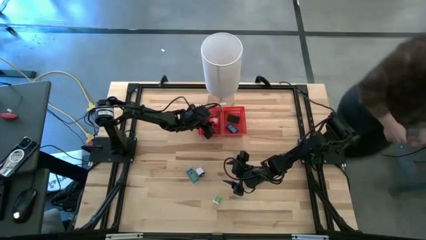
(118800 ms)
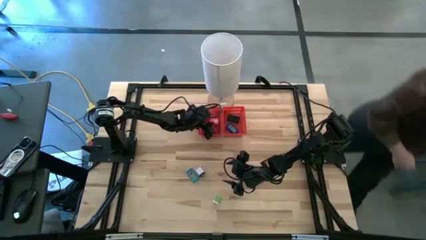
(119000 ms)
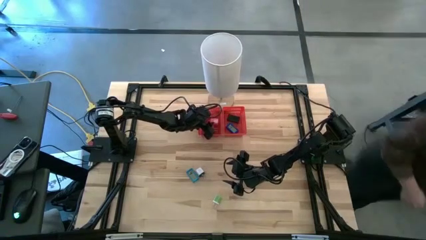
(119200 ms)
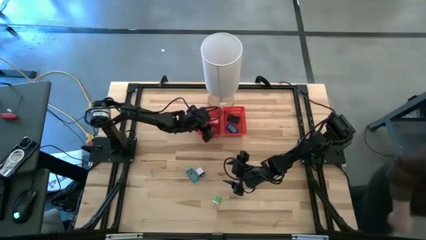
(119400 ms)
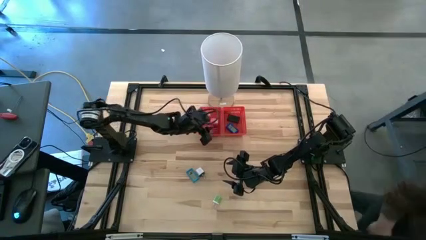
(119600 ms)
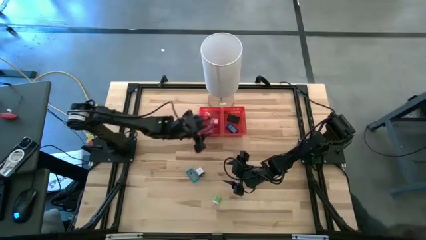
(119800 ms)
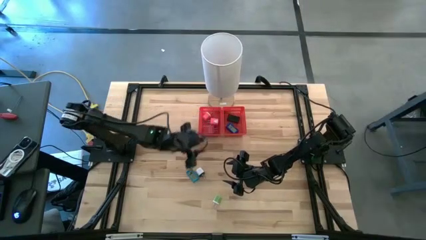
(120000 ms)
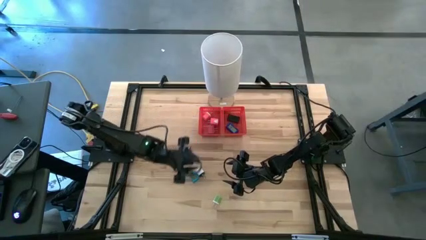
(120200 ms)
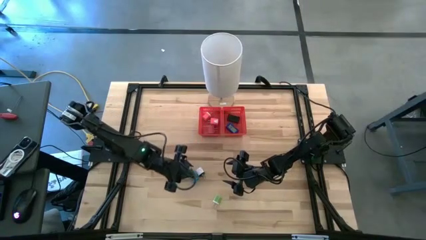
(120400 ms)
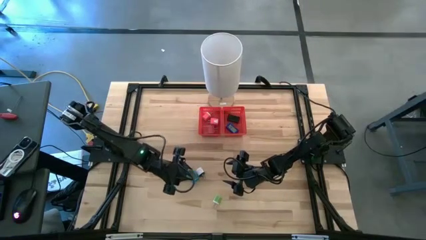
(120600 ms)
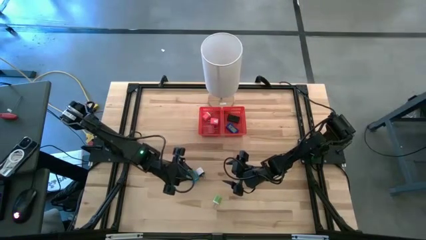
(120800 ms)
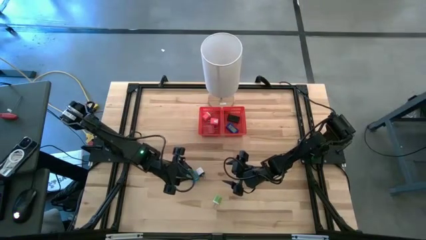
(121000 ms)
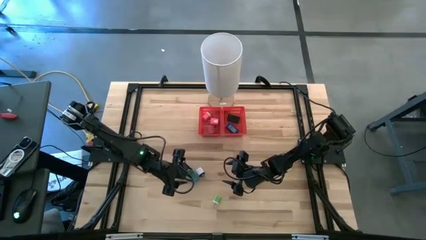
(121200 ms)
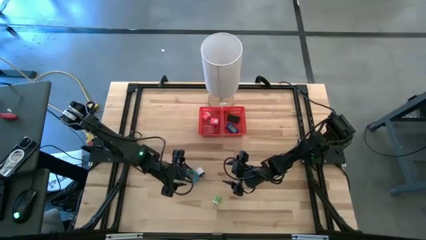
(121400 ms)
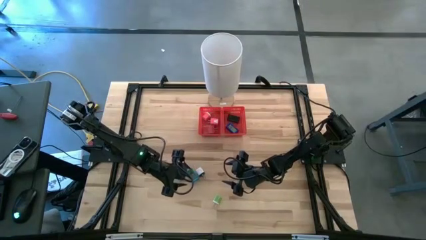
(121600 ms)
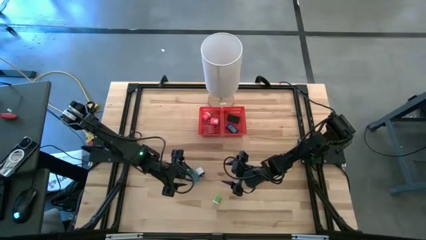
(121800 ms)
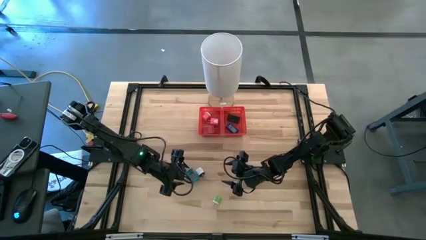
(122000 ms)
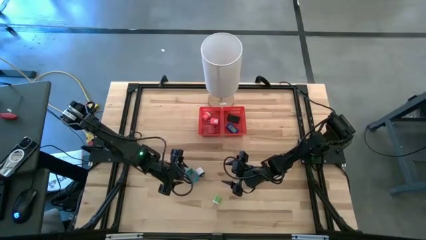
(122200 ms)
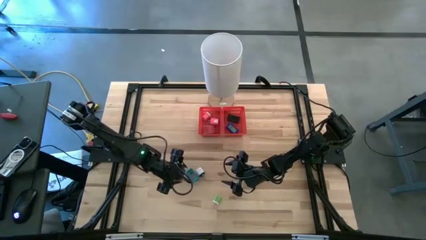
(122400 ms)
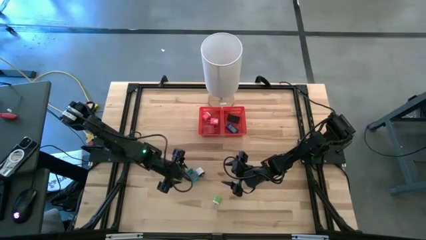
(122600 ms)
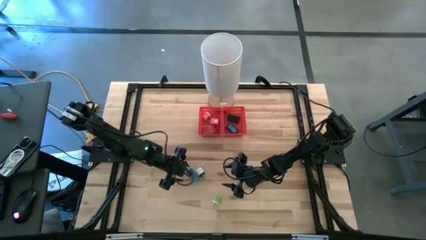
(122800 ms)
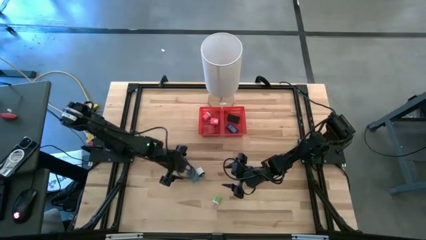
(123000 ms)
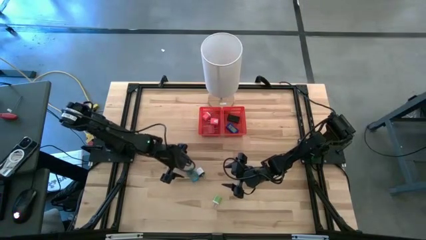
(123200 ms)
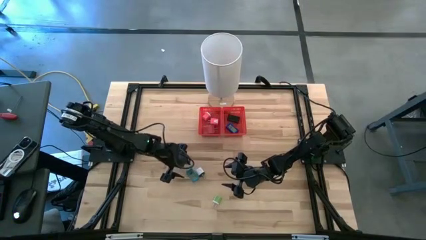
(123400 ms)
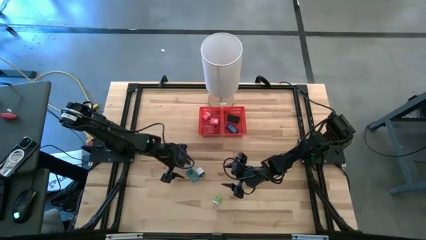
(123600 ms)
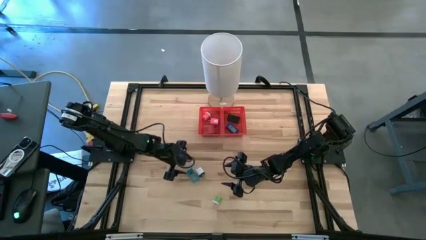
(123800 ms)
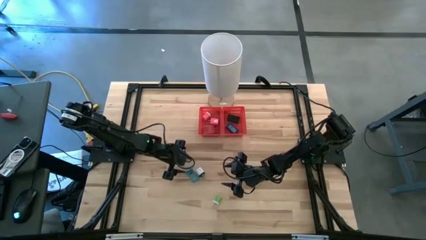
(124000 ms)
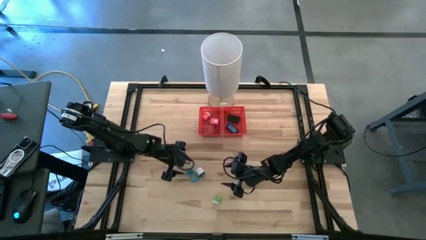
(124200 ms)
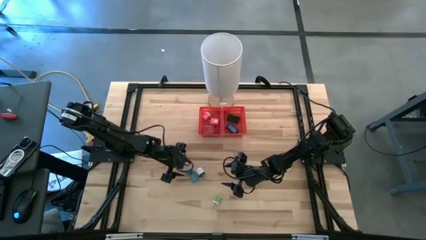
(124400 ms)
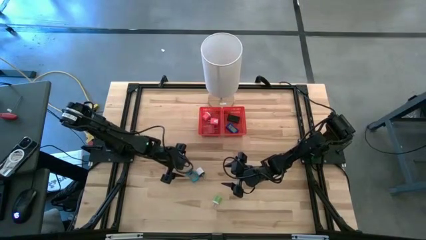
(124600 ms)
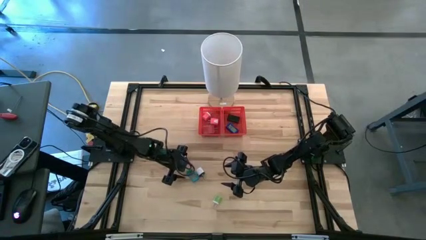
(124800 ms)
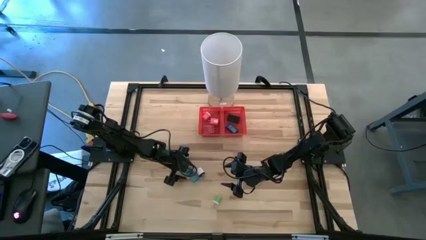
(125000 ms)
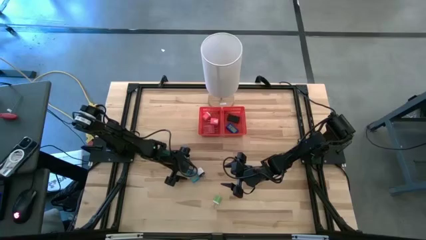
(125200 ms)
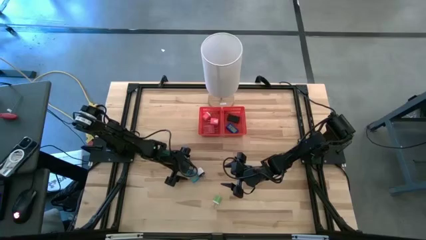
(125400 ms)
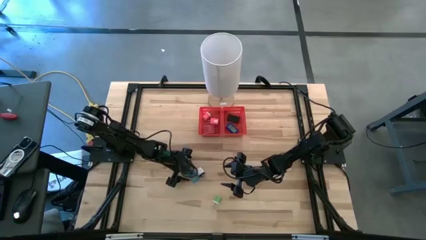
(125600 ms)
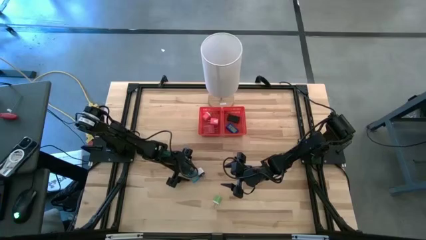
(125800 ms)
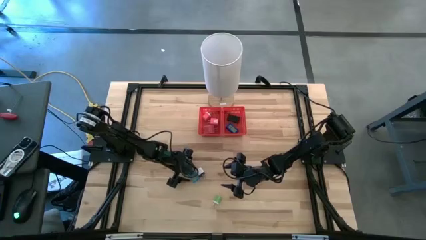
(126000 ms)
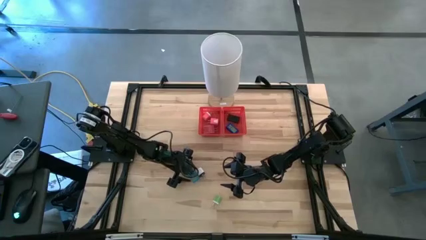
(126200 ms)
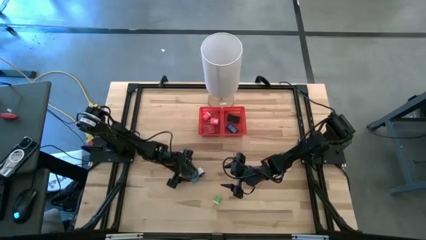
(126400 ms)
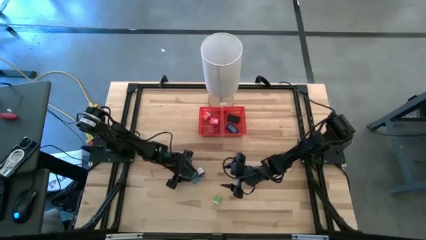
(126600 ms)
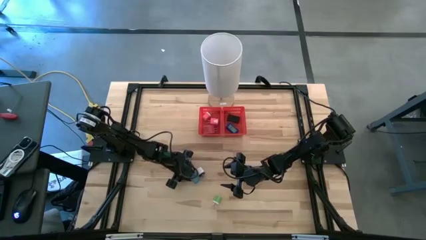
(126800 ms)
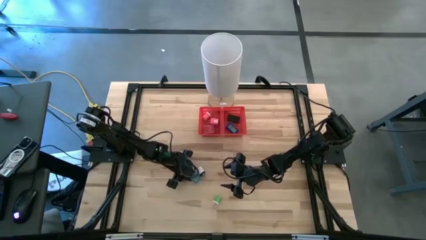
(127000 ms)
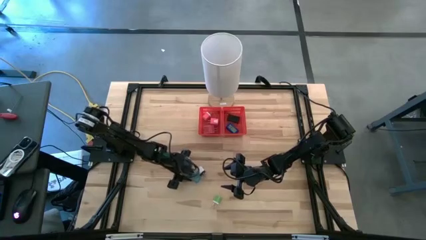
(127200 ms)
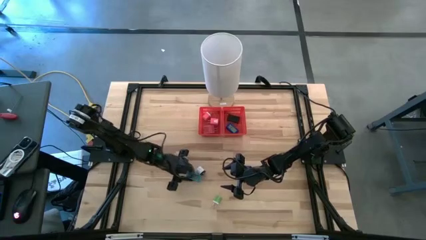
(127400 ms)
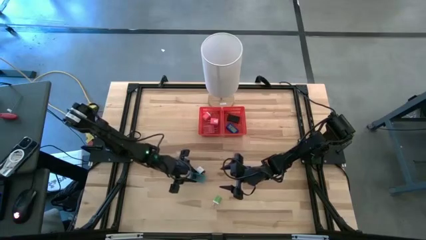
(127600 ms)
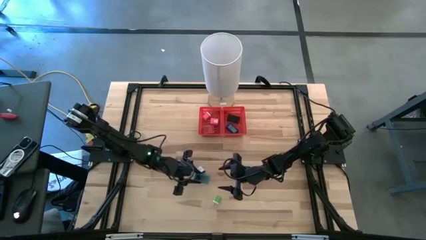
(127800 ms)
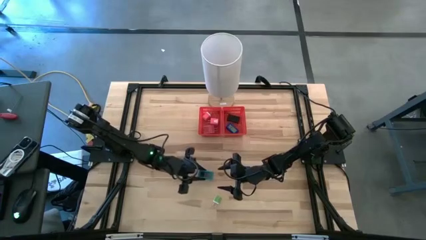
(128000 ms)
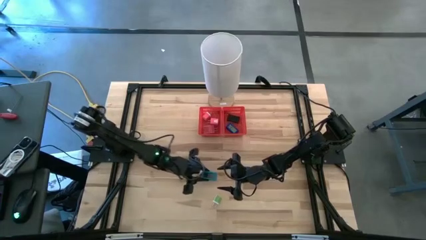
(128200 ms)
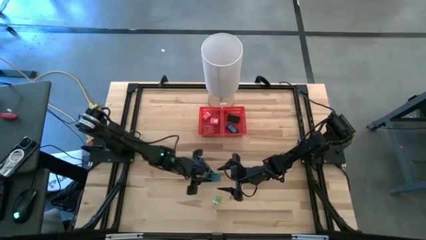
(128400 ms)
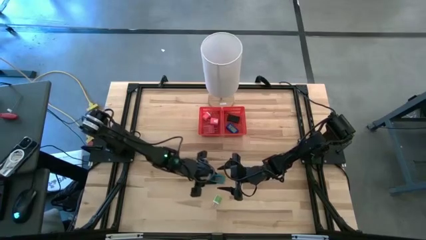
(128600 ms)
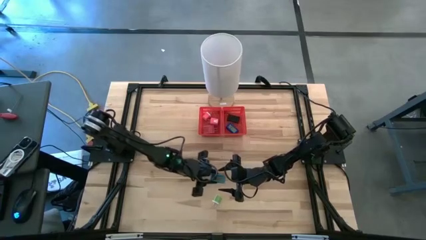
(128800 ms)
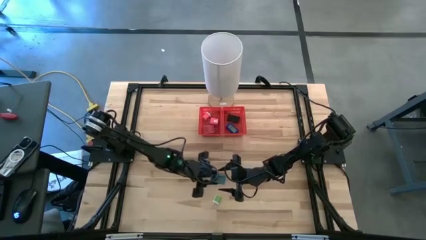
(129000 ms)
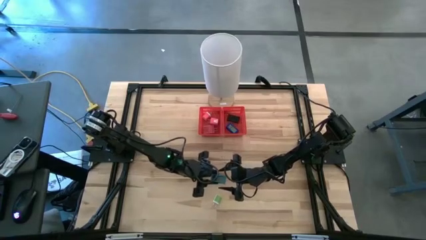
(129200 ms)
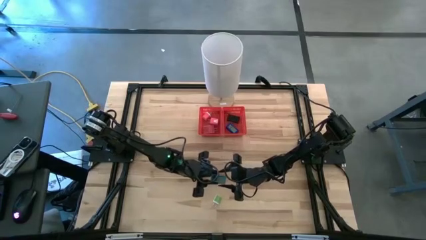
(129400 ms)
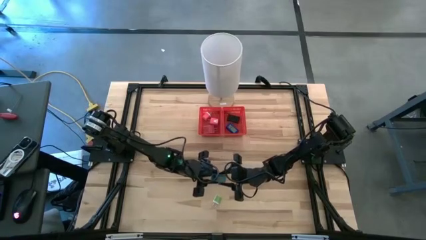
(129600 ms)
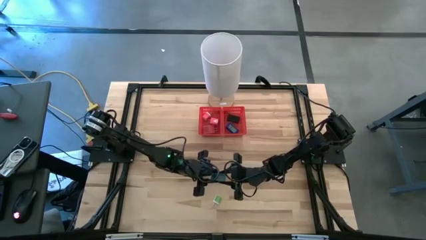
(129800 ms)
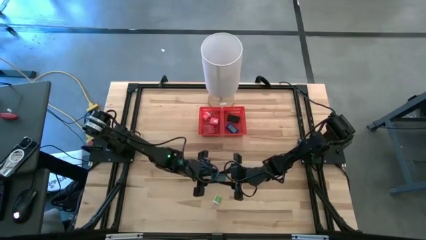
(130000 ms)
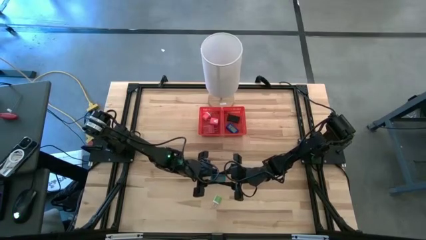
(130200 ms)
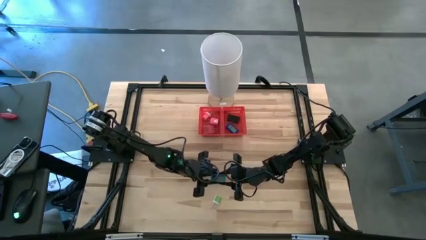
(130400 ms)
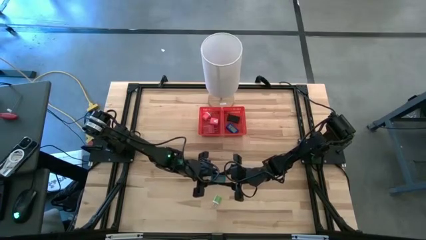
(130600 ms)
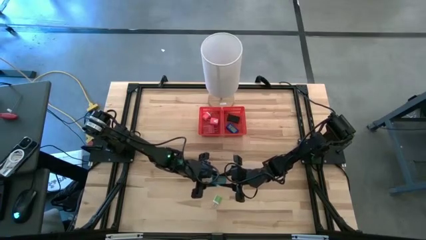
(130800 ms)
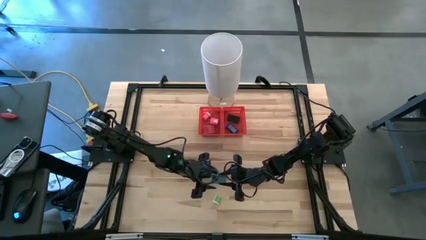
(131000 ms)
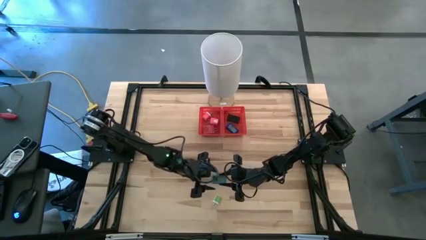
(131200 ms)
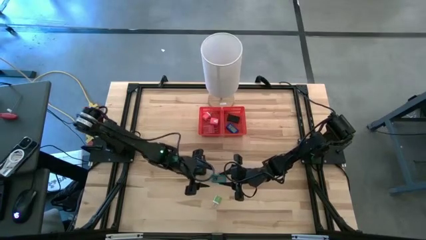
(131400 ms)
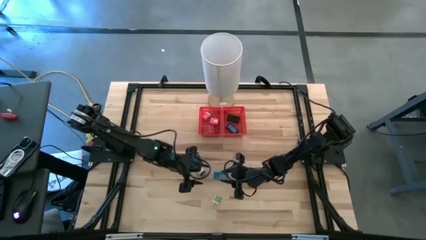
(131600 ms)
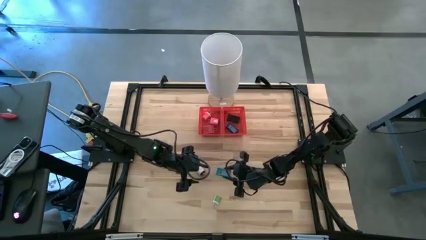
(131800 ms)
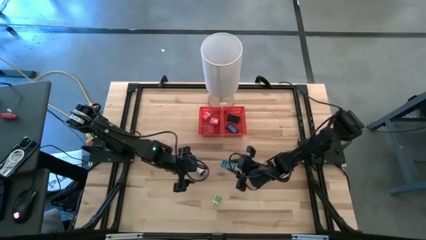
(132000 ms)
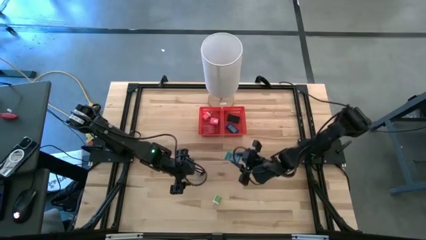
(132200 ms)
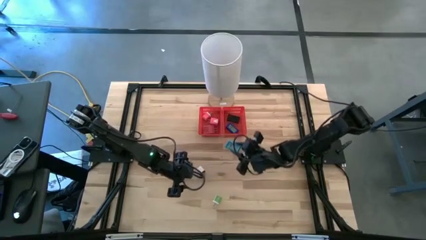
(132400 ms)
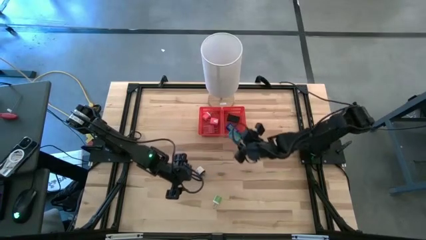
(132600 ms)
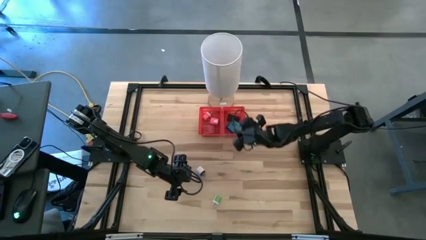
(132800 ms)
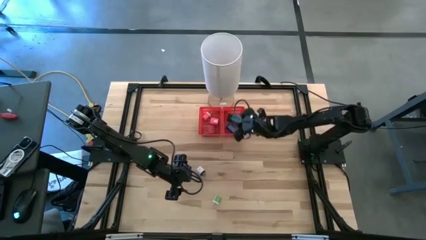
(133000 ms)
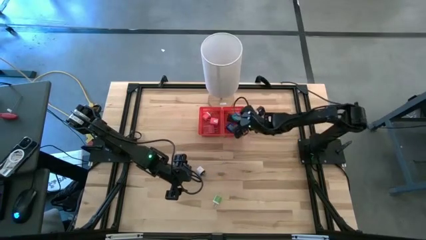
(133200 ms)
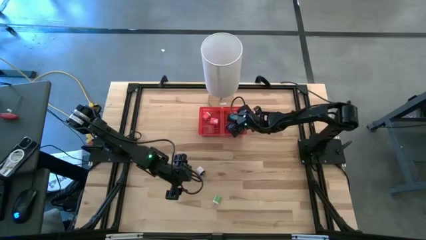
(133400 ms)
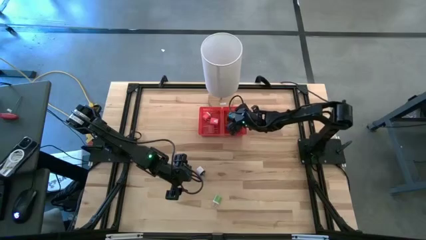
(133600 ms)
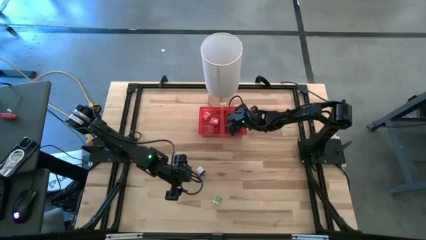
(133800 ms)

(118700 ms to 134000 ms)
Task: Pick & Place Office items
Put the light blue digital clock into the right red bin
